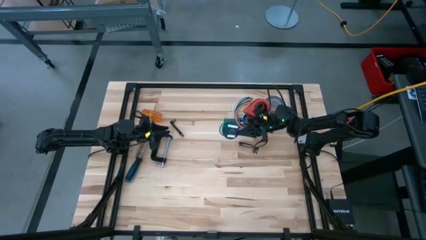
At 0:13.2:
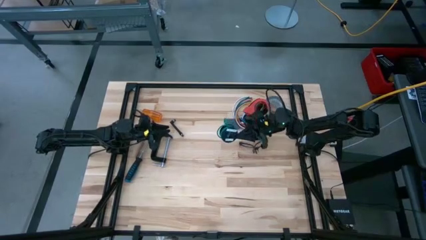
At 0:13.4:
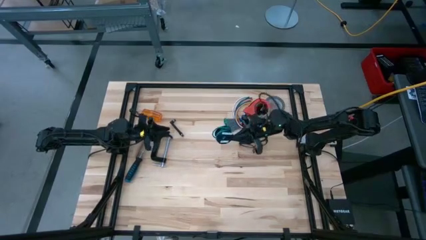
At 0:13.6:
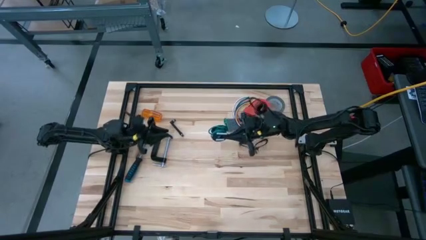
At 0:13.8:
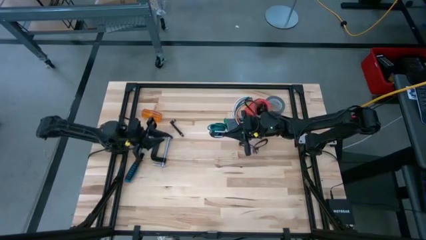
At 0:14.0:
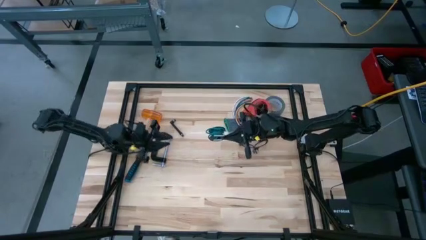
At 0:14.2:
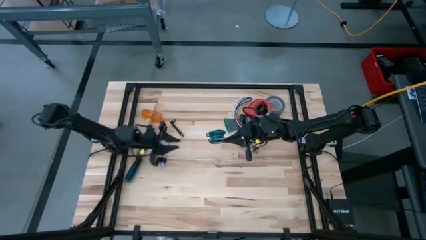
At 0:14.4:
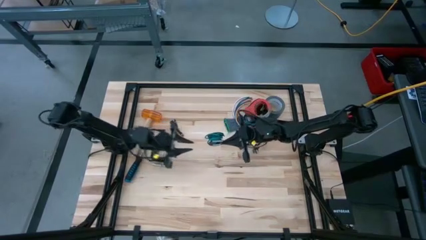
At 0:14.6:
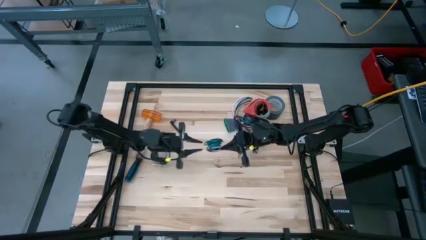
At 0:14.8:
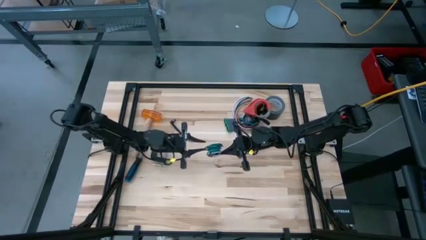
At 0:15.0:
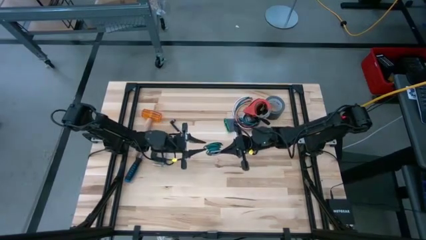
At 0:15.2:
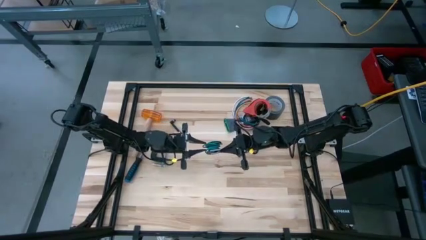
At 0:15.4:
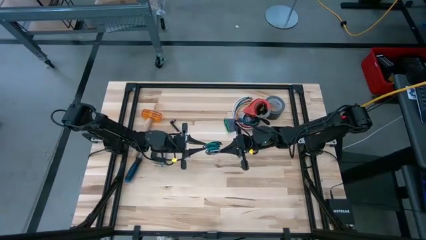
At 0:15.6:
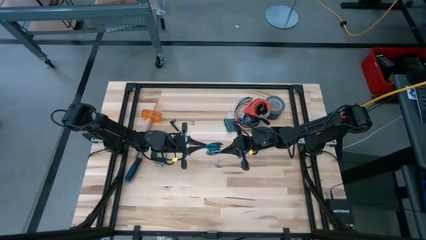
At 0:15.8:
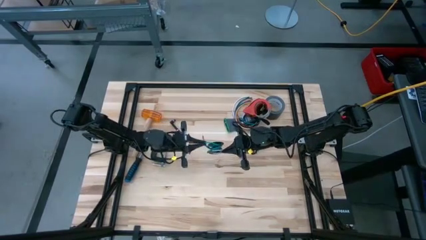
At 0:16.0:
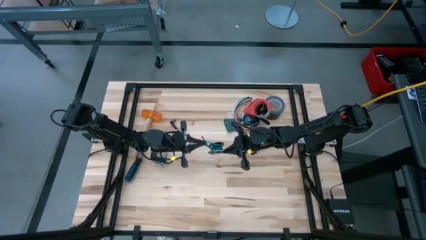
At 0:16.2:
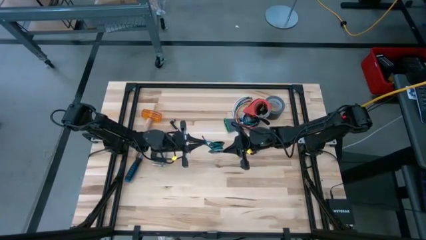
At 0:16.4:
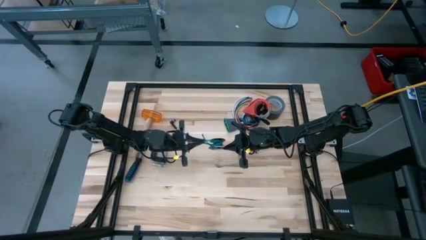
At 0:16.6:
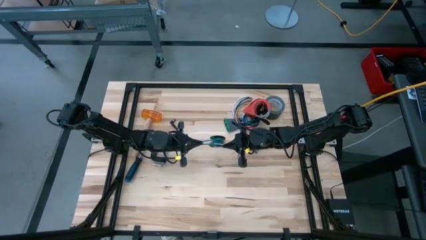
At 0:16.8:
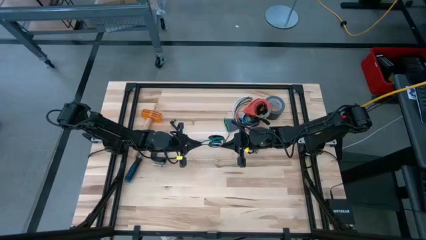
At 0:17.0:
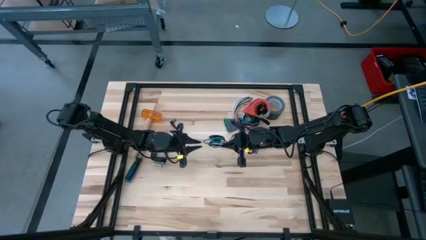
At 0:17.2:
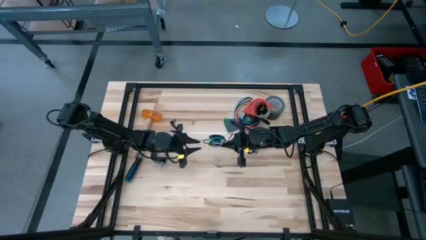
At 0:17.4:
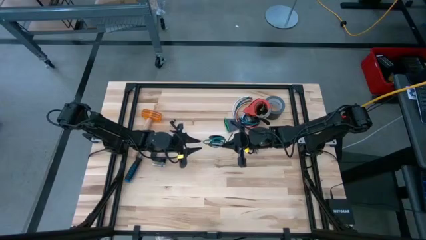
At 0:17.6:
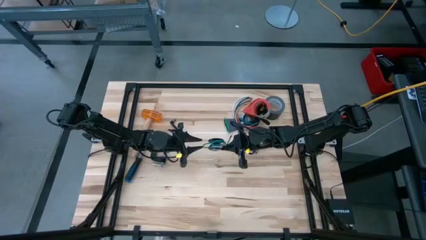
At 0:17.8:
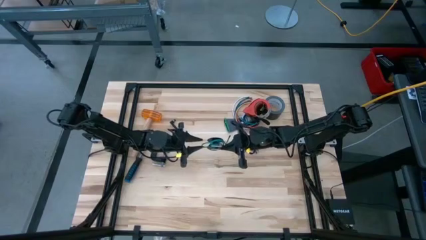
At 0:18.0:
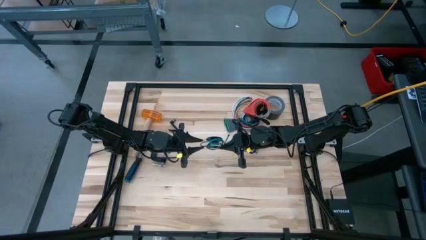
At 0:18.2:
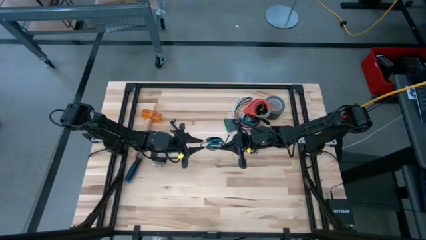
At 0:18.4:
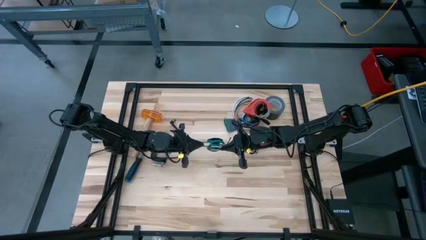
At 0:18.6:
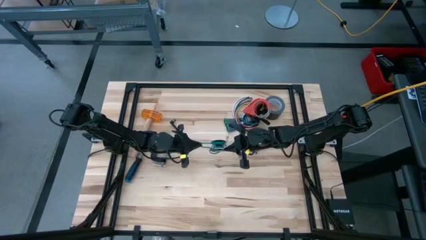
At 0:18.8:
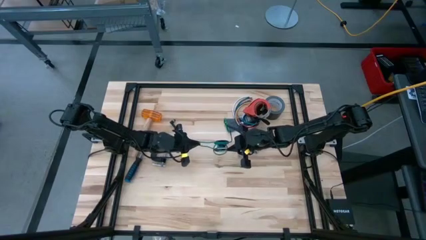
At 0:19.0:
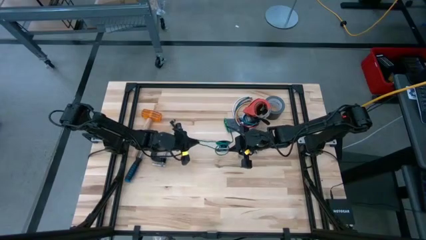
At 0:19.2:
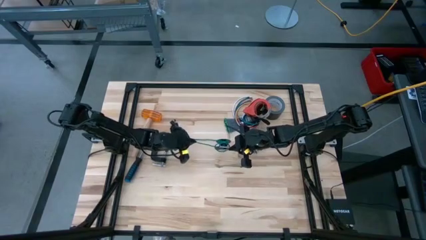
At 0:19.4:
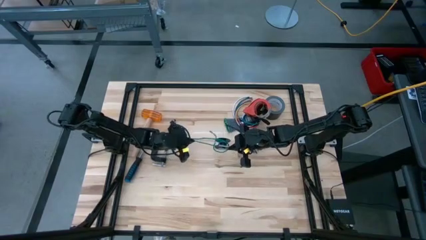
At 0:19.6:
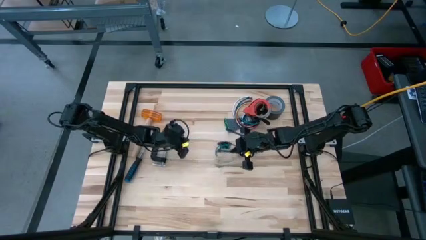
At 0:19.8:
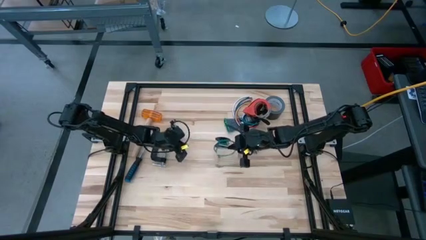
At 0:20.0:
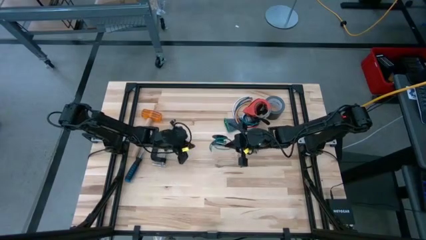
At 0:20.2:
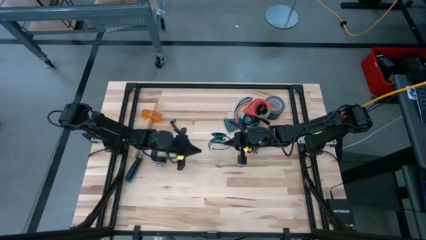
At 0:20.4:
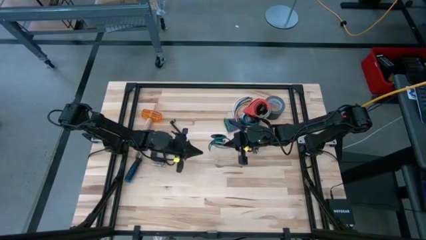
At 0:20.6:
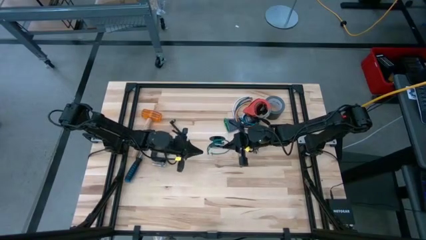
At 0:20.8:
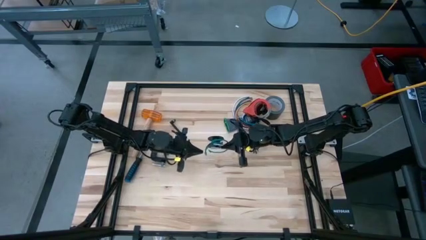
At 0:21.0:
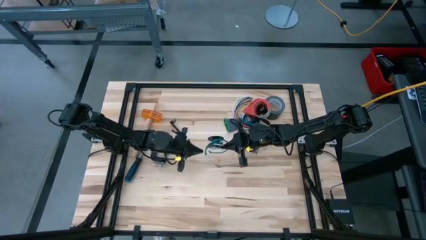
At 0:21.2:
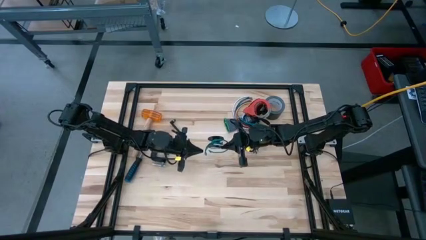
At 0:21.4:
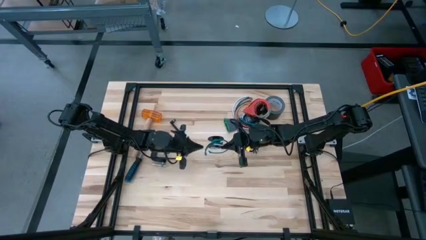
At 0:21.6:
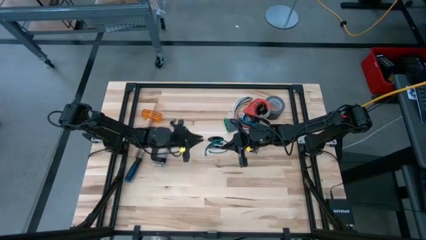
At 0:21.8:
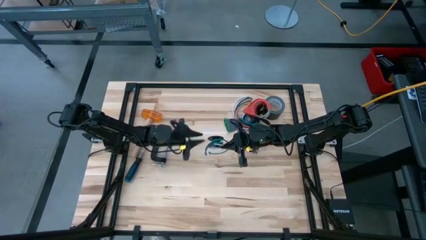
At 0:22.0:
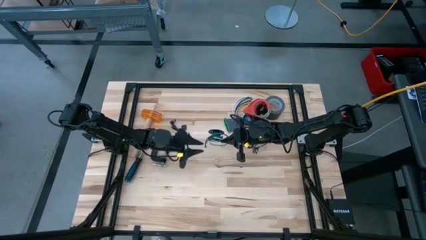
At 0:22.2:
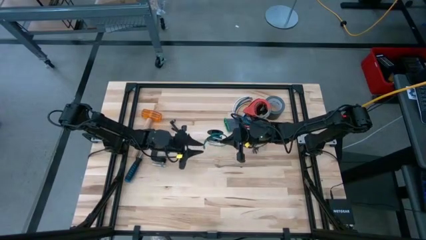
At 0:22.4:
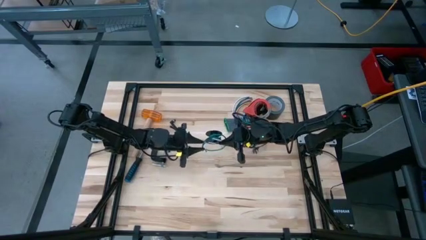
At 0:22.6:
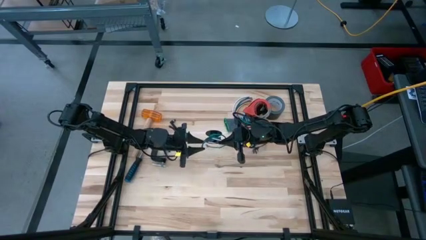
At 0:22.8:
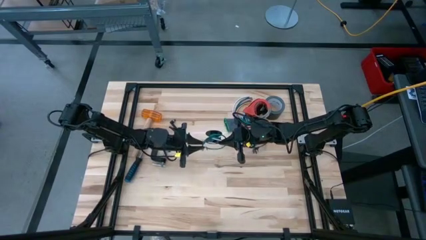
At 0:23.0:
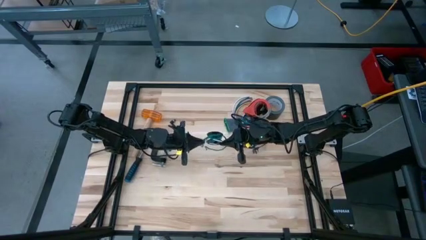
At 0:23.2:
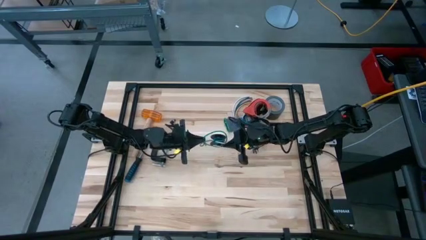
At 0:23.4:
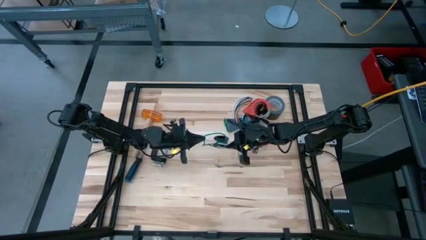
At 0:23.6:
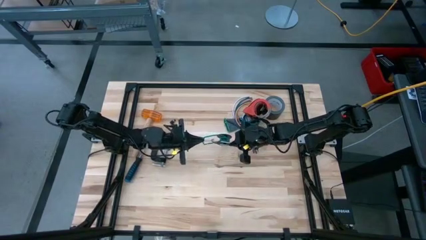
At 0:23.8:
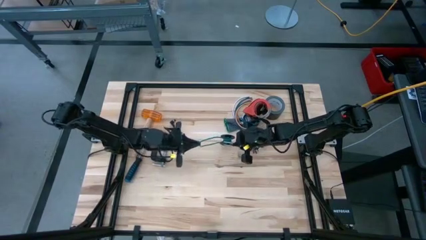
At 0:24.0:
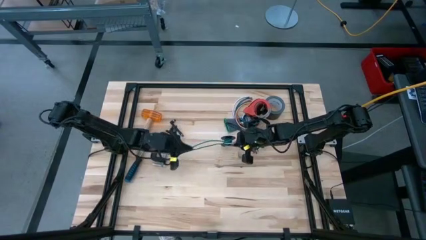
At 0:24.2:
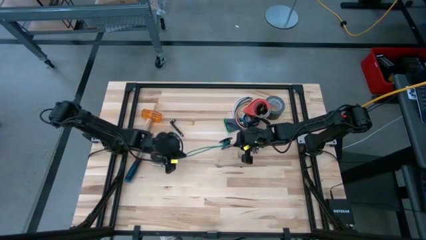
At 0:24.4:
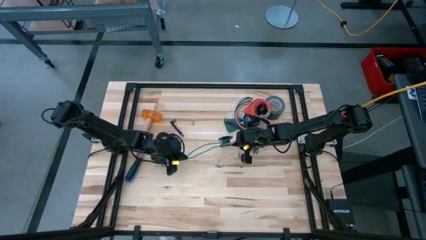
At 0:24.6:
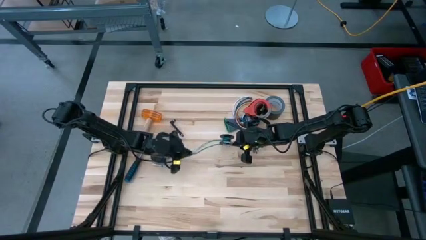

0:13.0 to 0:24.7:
Task: Coil cords
Uncoil the green wire from the spool

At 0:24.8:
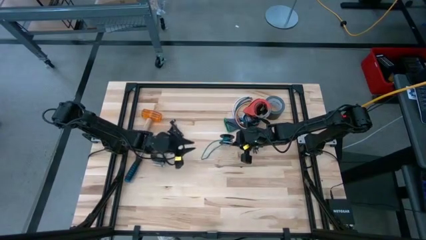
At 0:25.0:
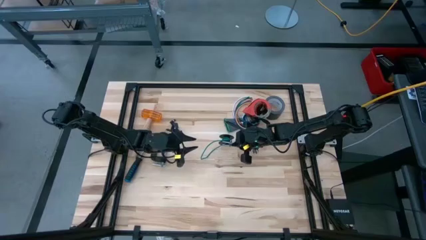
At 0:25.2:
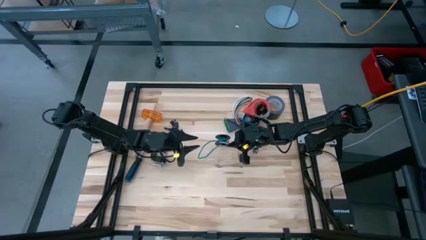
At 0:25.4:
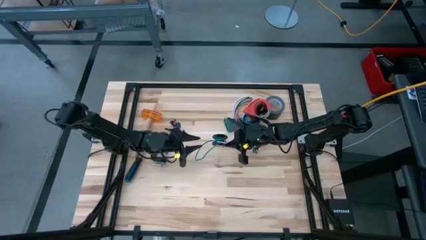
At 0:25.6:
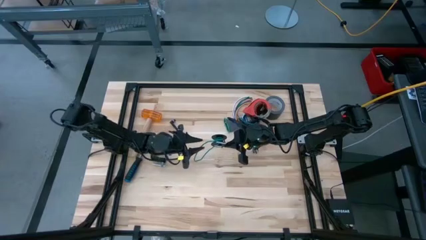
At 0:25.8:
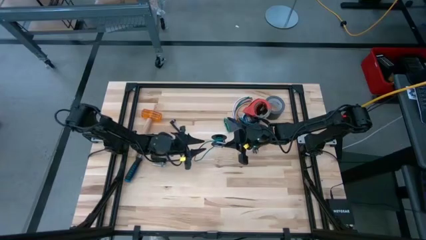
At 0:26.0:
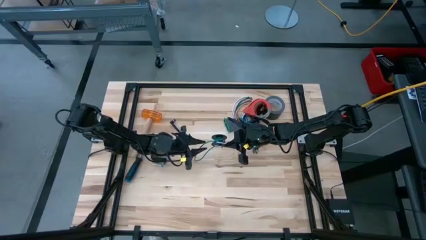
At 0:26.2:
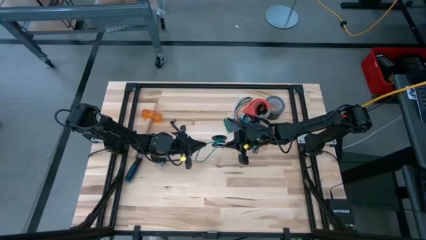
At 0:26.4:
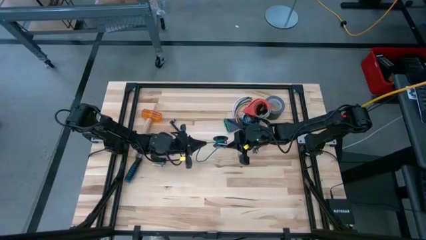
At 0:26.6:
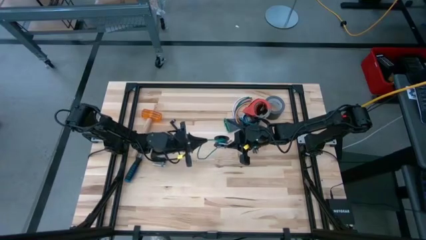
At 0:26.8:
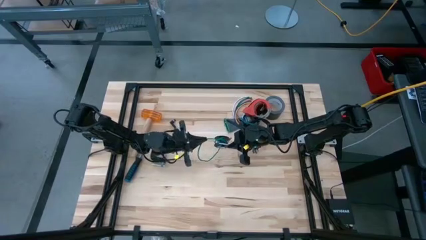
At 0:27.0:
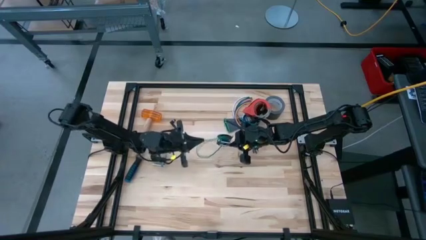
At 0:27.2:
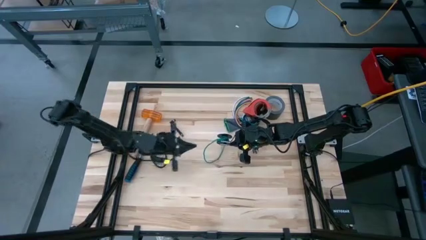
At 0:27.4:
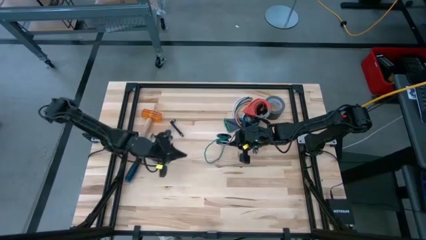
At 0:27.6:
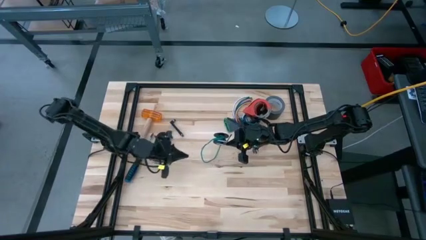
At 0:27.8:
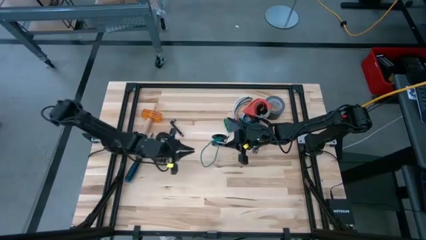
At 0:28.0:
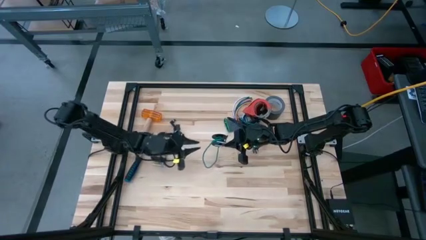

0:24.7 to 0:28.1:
Uncoil the green wire from the spool

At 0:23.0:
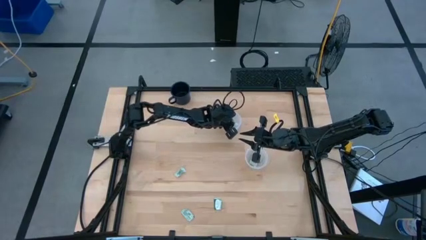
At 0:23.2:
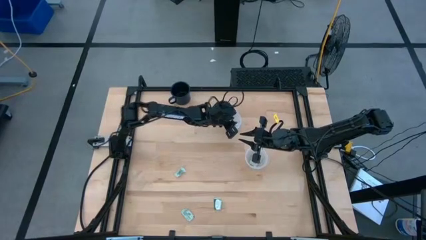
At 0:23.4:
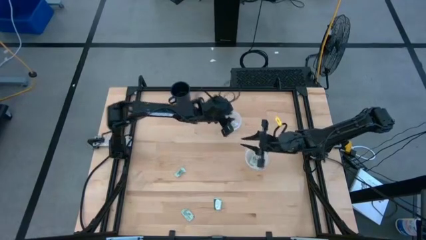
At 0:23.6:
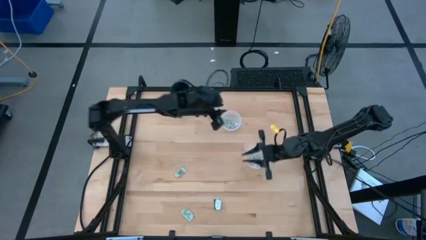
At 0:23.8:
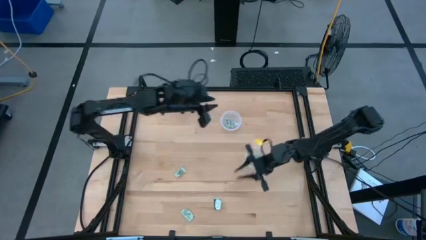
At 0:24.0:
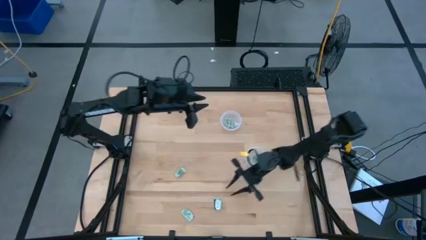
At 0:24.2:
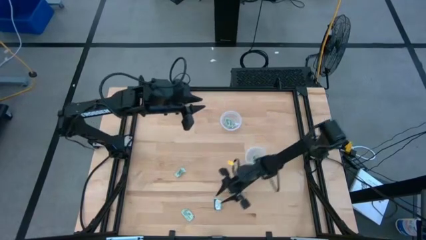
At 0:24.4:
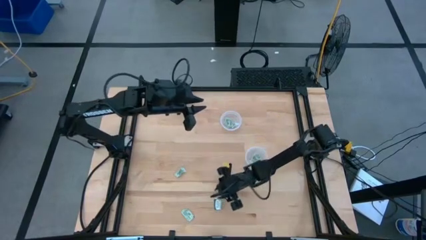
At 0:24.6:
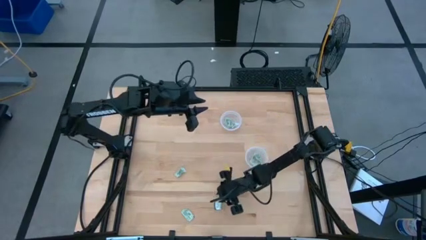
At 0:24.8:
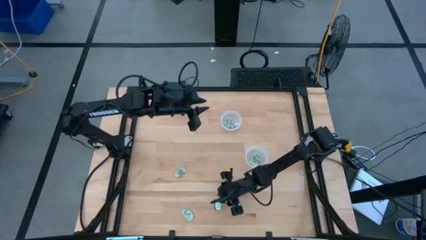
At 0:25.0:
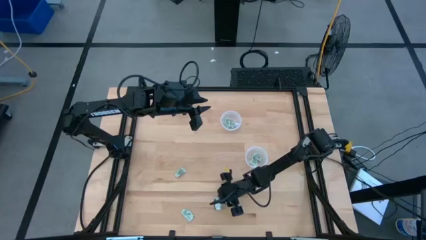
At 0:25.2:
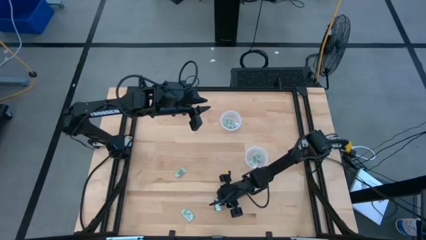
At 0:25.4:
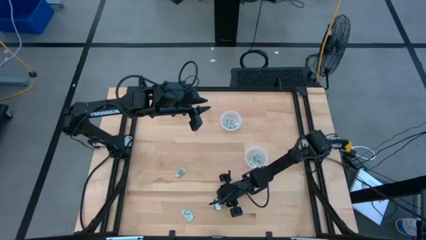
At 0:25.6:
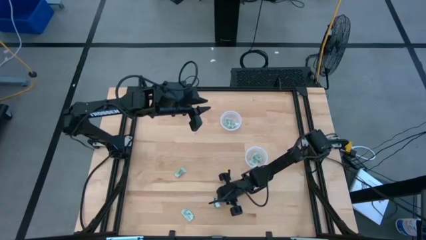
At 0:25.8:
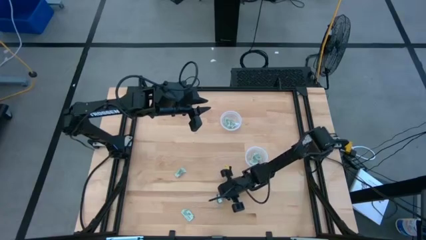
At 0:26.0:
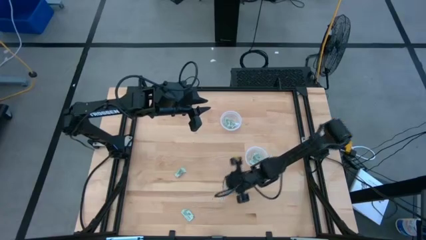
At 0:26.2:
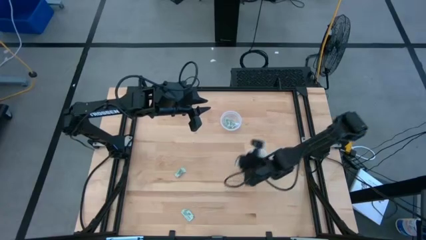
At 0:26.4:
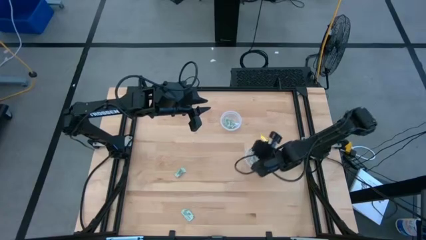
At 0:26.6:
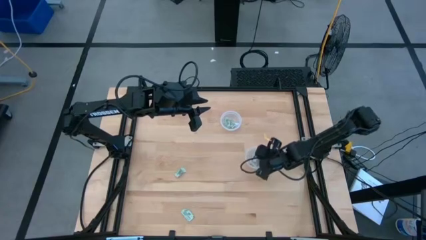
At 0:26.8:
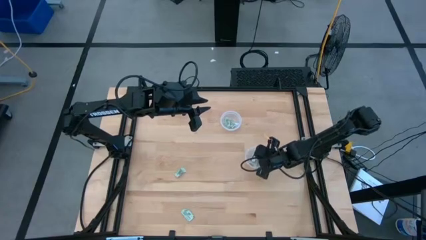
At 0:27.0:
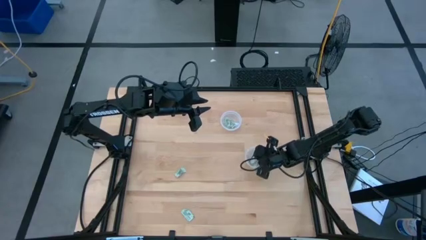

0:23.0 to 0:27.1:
Task: Pick and place items into bin
Put the stevia packet into the bottom transparent bin
